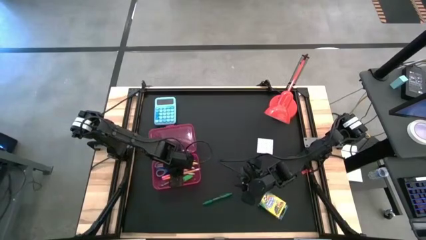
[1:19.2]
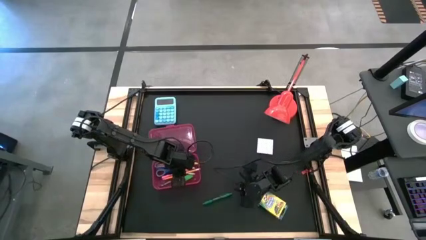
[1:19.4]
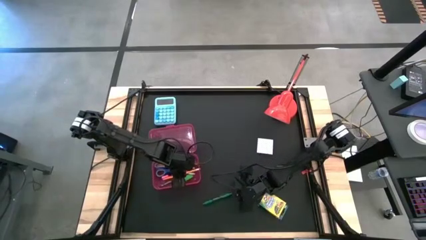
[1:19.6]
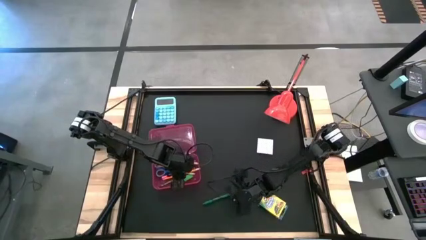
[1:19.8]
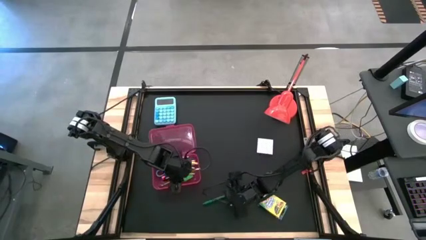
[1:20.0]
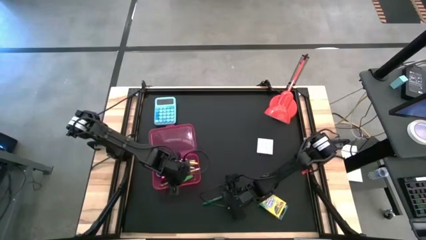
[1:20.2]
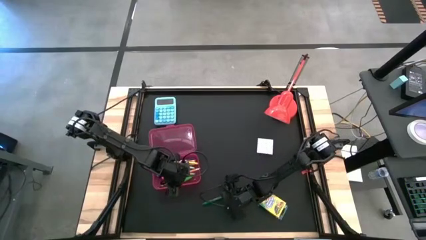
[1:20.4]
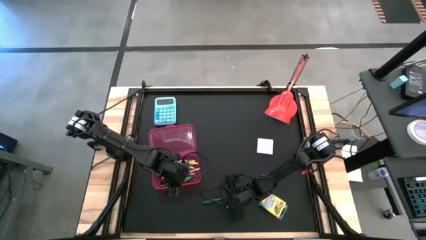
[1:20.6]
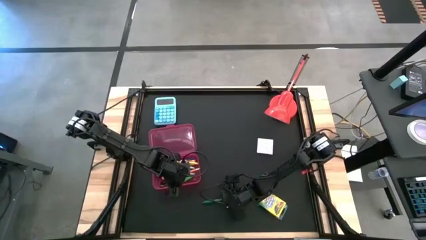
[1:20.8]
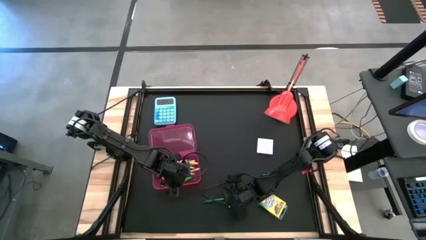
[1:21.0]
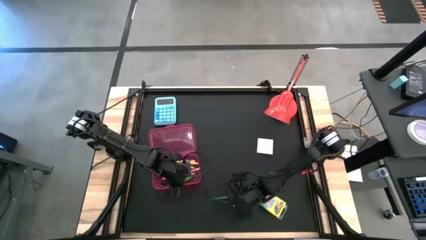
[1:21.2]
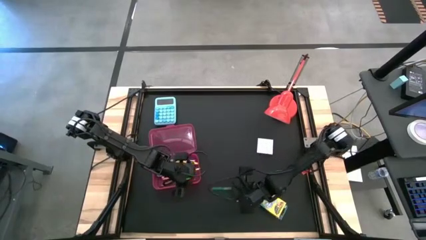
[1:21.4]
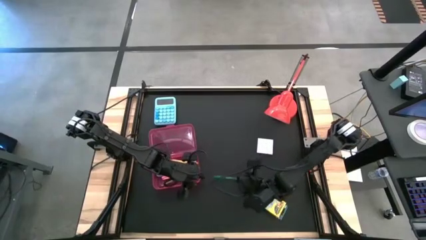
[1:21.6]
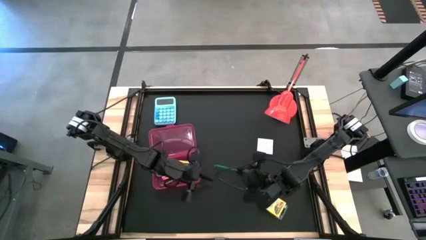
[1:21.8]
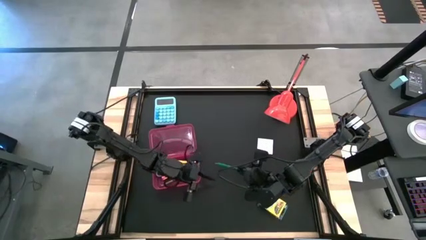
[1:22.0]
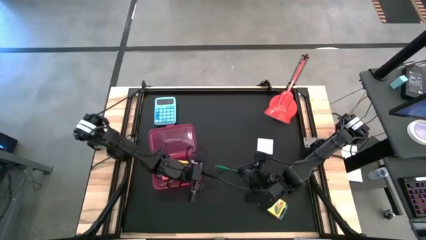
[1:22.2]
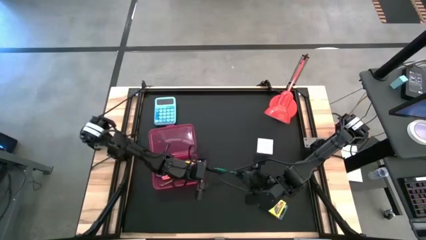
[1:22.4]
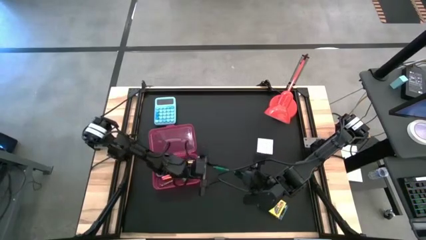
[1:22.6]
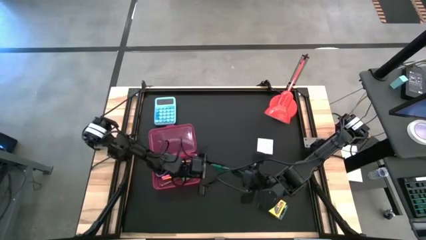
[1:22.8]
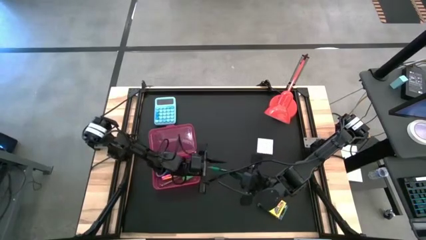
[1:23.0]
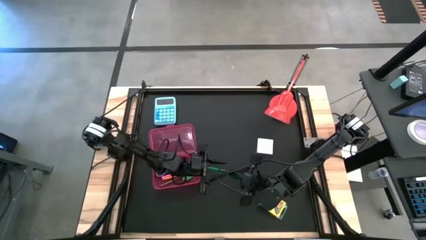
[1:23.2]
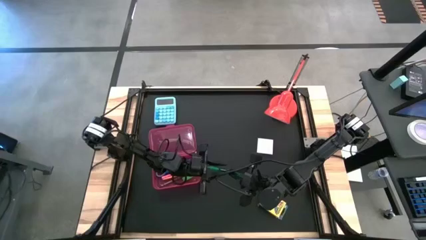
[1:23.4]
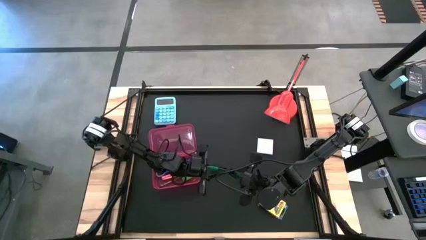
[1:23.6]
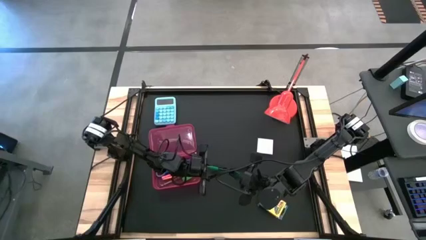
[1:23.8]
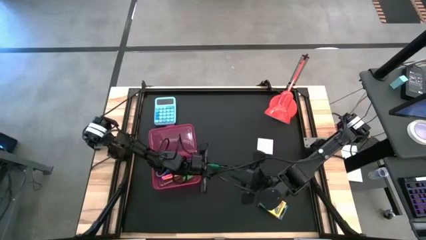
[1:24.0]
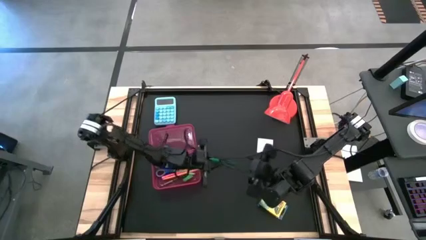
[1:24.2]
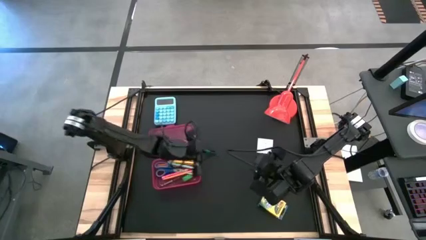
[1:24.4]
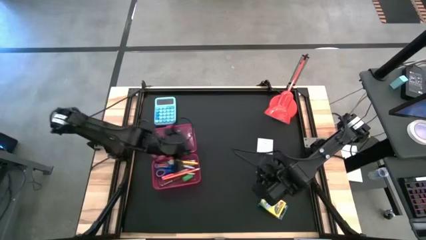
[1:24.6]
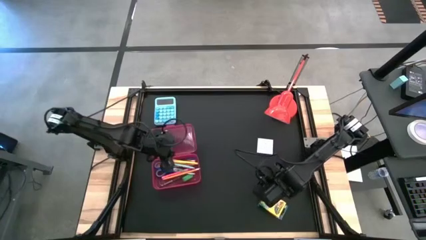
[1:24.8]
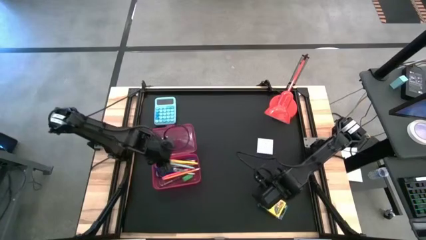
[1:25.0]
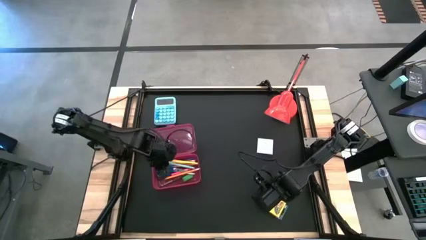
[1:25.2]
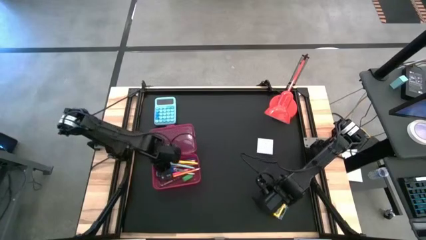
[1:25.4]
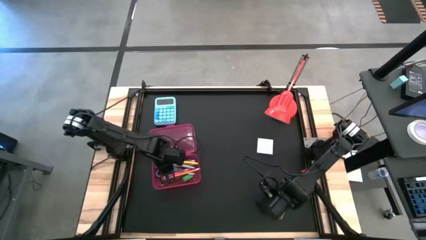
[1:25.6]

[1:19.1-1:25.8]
Task: Pack school essentials
Put the green pen into the pink supply box

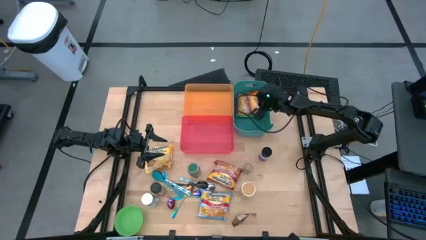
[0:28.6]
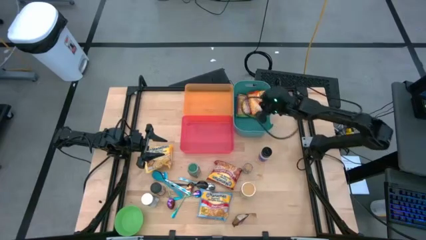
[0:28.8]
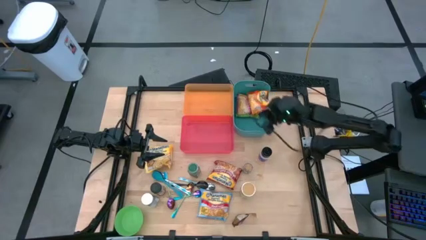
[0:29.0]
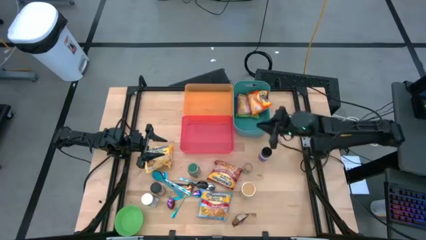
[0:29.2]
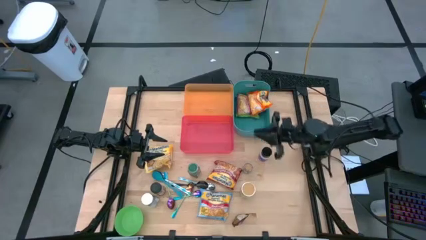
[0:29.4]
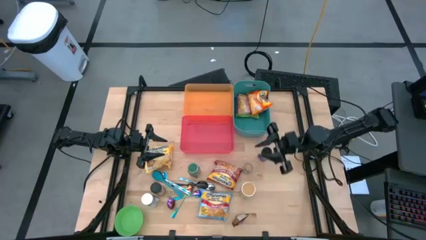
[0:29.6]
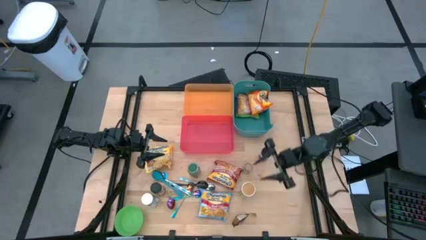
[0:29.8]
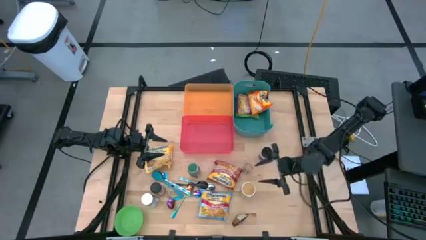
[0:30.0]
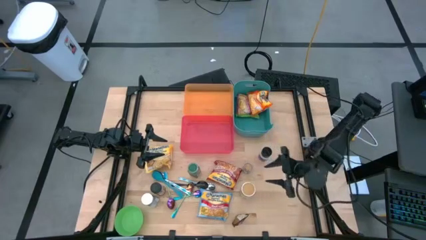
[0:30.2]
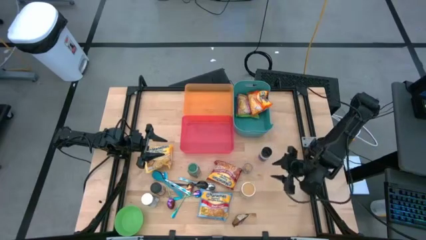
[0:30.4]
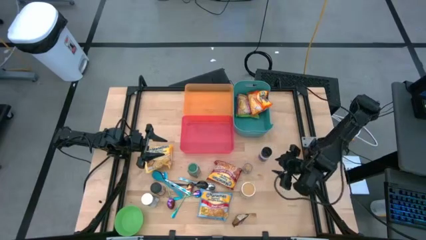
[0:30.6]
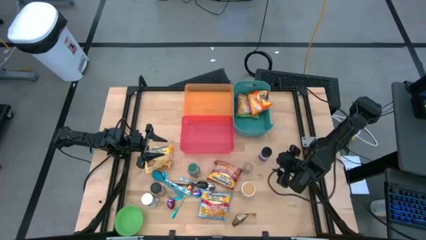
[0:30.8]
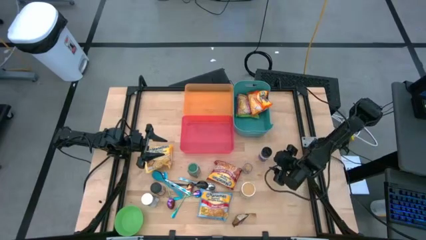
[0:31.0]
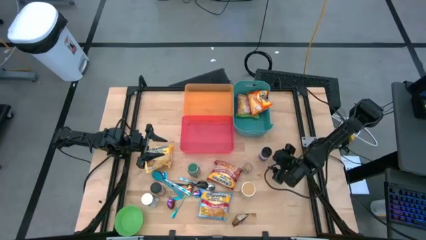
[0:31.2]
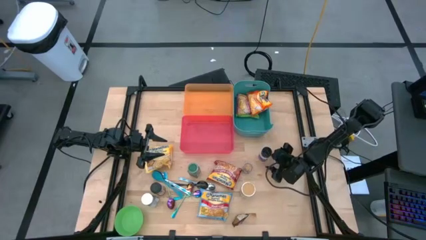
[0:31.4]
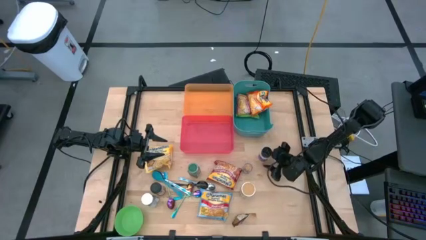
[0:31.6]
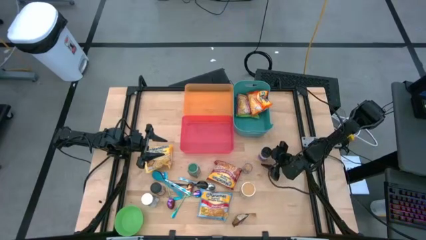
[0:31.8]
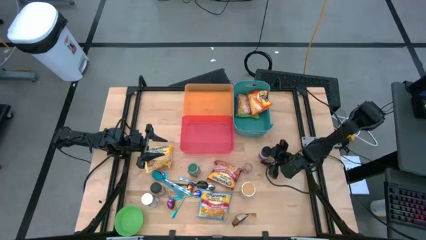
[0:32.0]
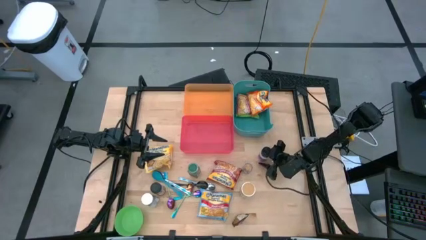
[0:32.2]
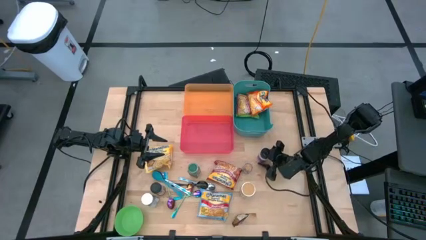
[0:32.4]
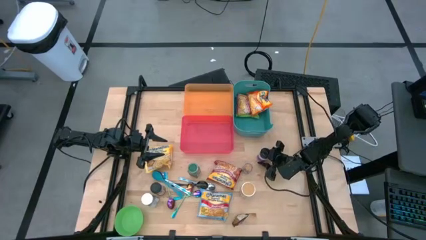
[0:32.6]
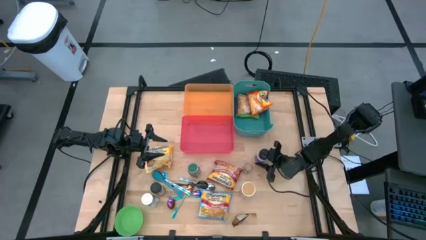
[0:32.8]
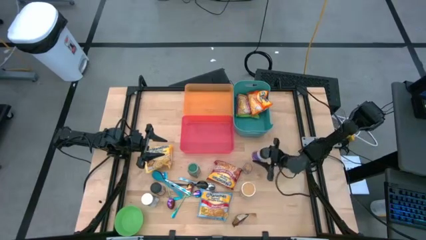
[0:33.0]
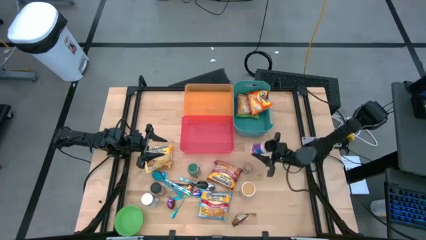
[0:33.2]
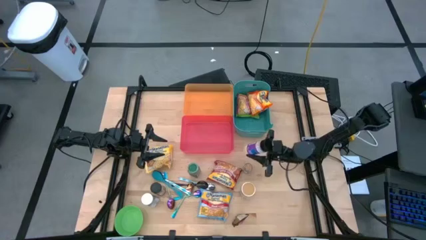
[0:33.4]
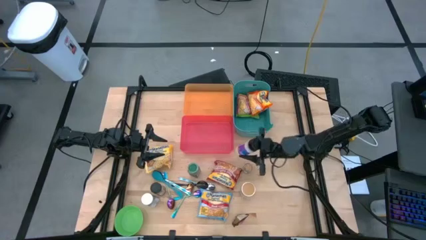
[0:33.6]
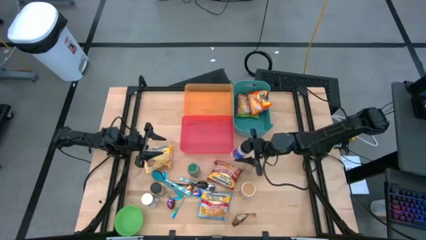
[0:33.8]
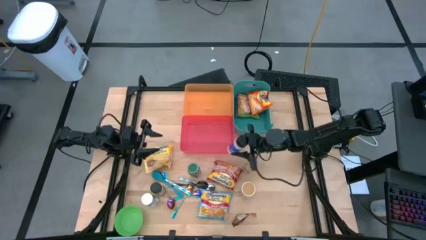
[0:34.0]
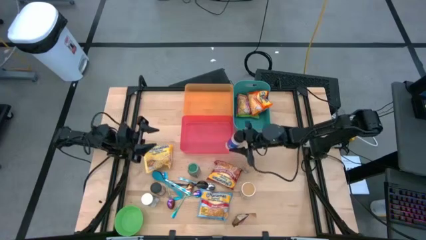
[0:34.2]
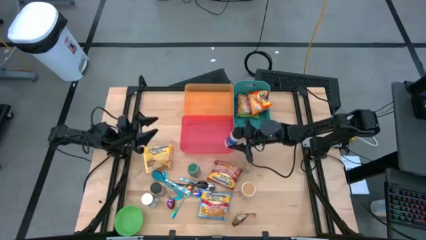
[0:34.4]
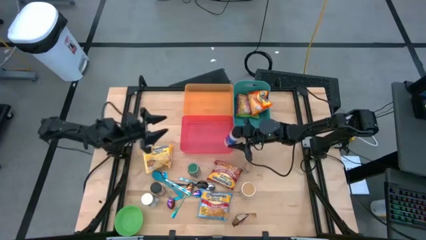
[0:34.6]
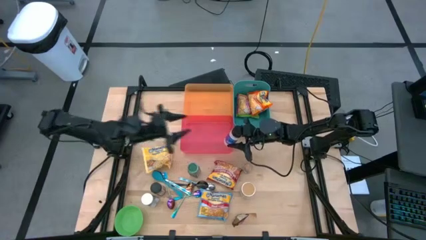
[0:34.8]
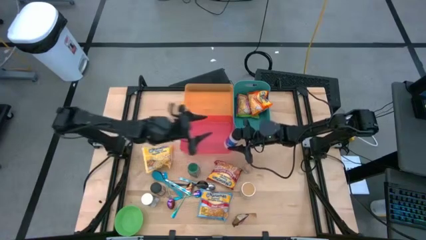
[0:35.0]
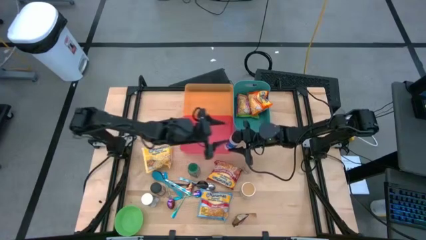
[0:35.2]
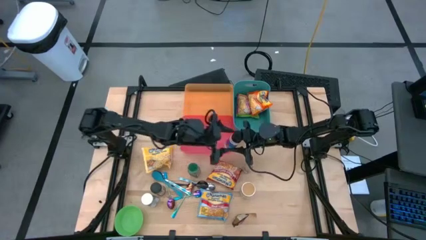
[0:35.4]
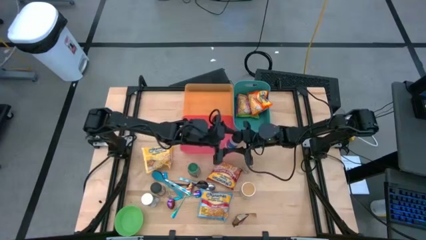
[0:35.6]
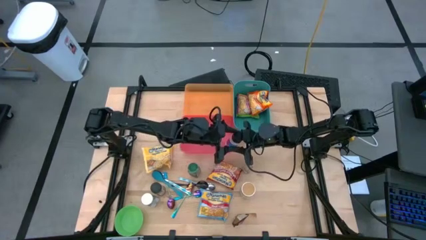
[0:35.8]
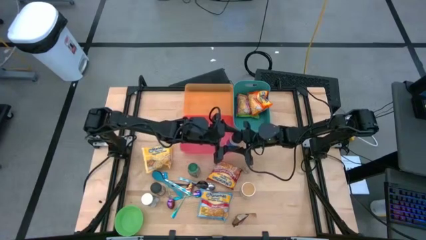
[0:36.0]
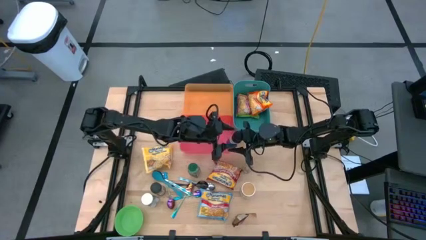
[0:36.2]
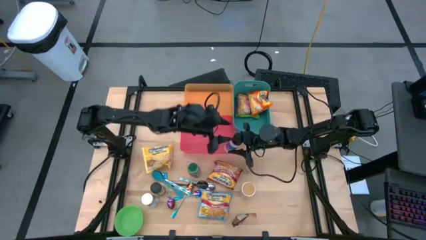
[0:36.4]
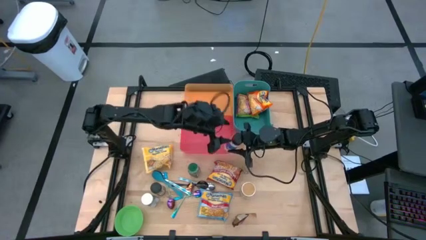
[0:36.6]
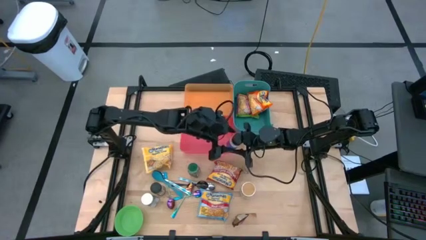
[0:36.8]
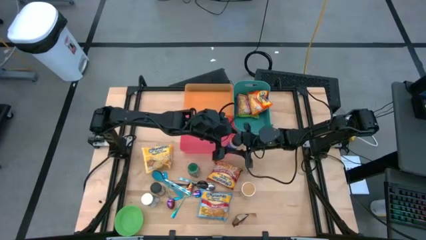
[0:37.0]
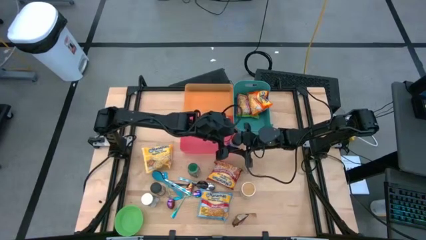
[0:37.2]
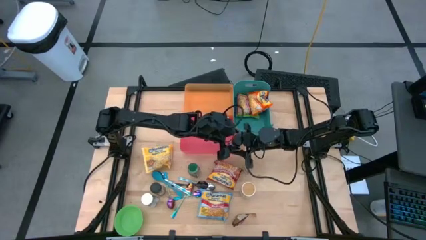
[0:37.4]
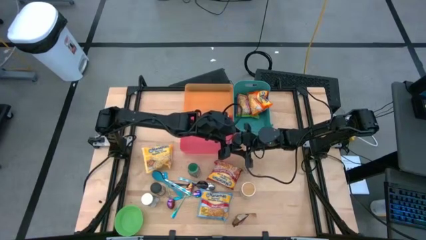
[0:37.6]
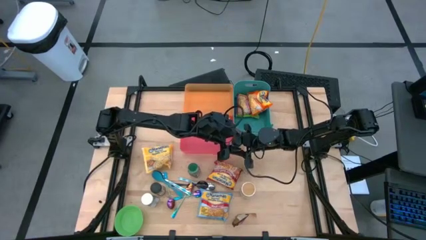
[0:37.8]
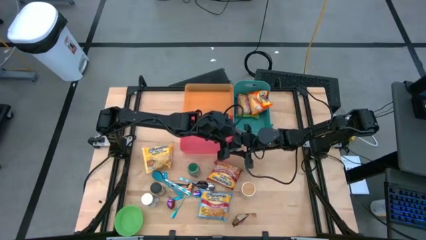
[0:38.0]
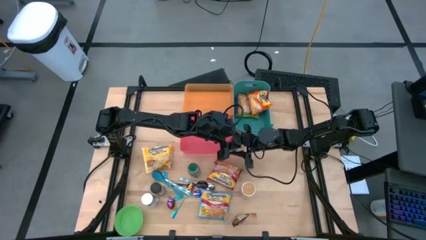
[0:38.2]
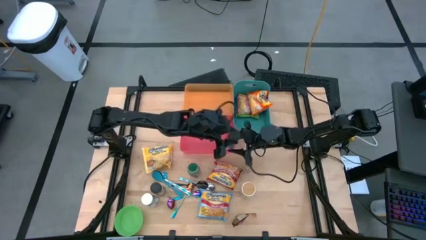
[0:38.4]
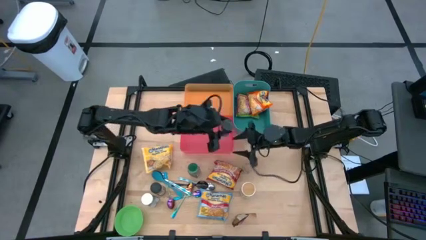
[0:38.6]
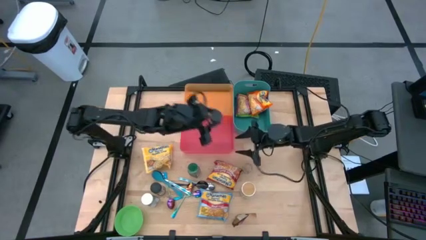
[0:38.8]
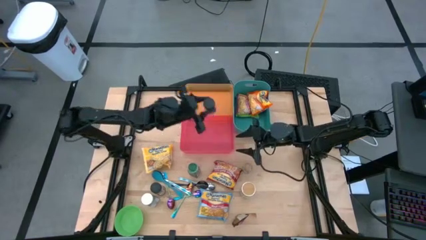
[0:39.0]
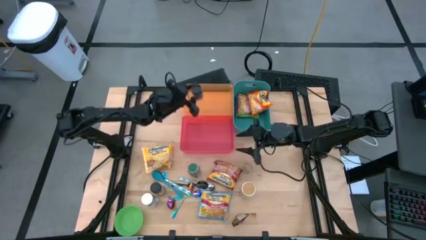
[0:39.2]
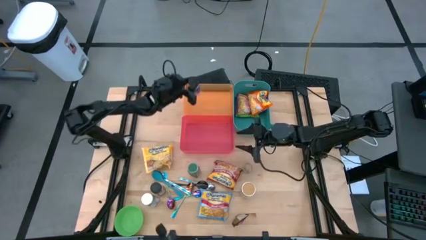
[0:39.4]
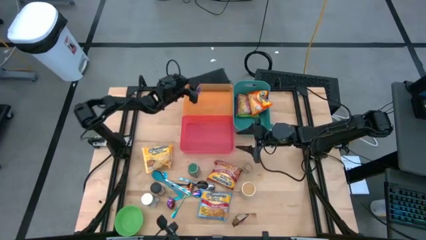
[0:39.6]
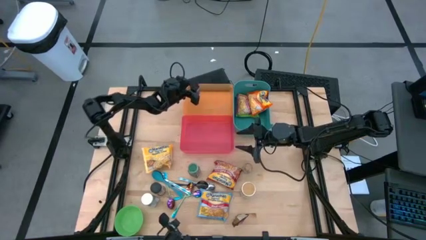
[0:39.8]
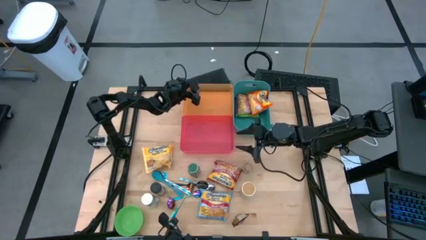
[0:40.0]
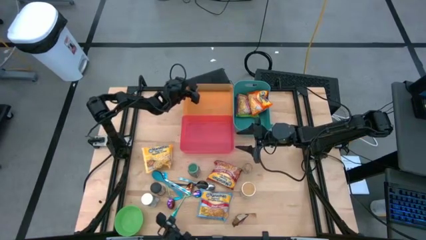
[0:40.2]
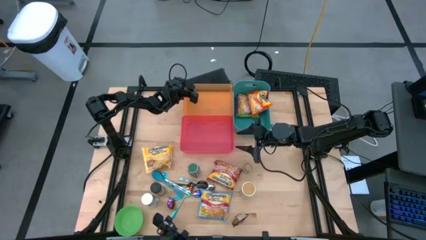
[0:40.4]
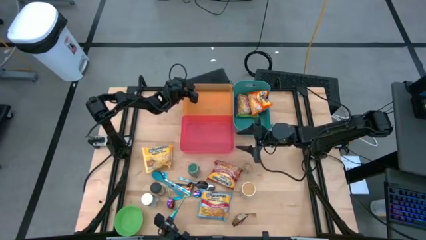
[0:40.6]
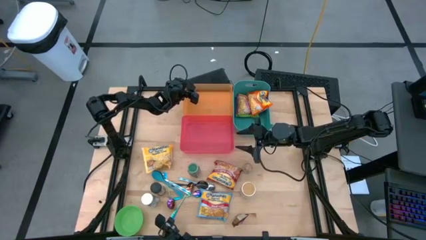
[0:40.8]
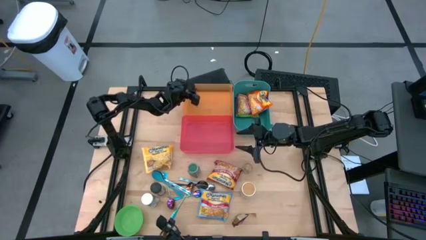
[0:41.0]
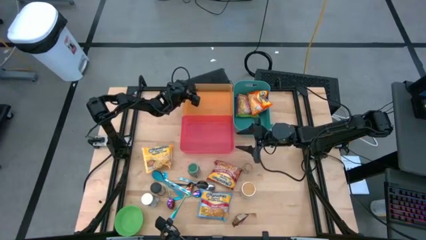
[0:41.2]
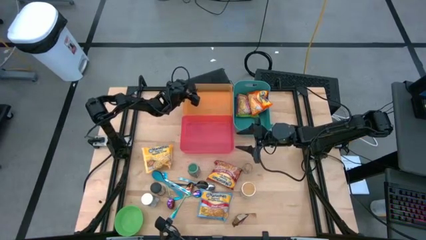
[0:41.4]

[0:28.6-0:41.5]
Task: Pick & Place Food Item
Put the purple spice bottle into the orange bin
